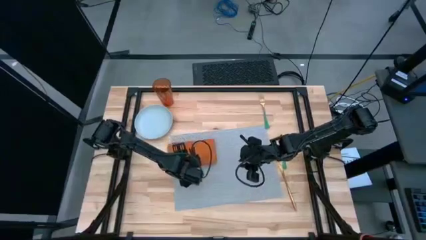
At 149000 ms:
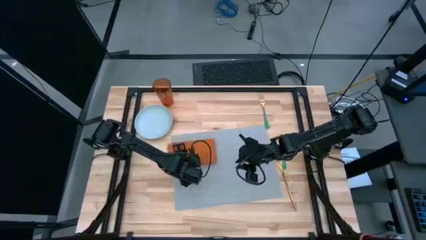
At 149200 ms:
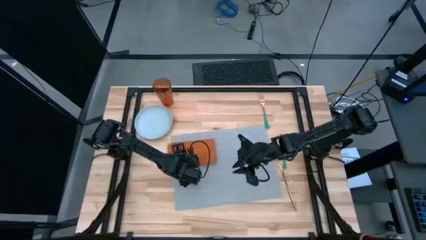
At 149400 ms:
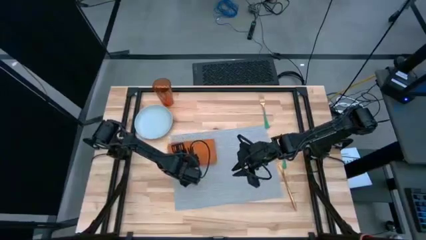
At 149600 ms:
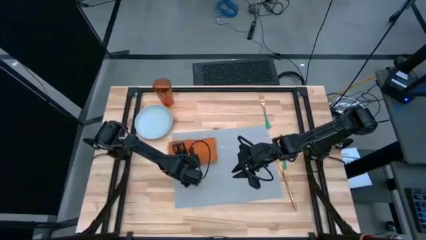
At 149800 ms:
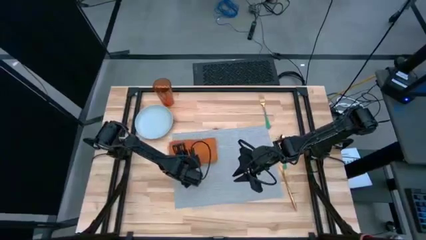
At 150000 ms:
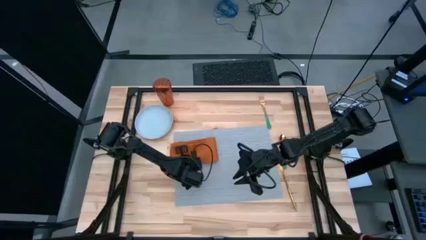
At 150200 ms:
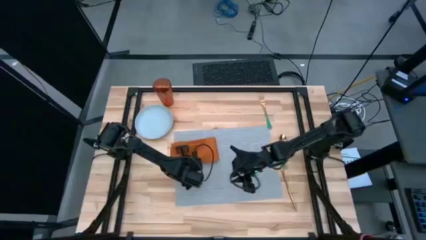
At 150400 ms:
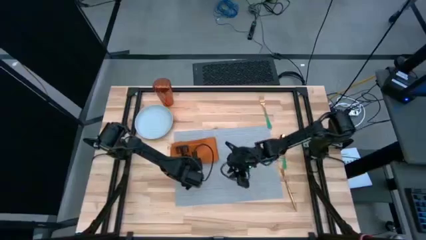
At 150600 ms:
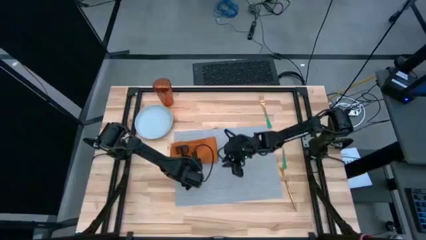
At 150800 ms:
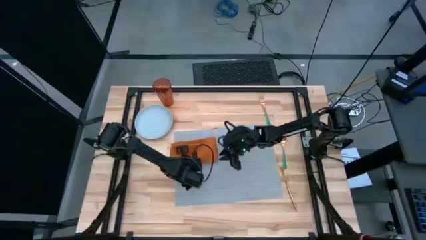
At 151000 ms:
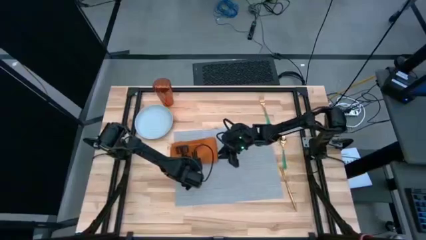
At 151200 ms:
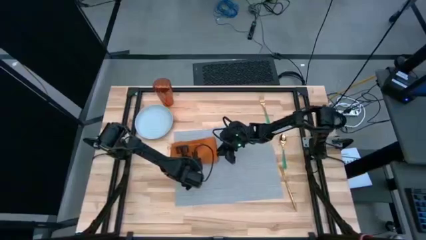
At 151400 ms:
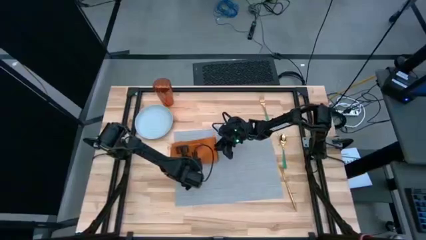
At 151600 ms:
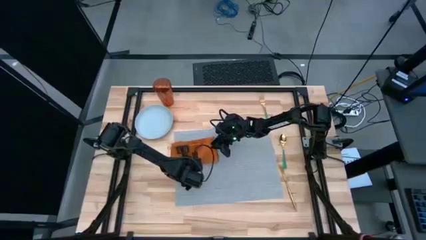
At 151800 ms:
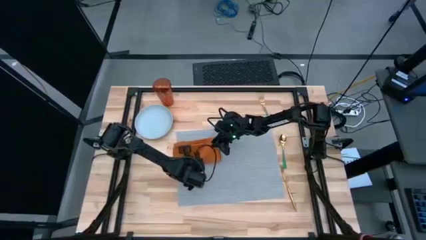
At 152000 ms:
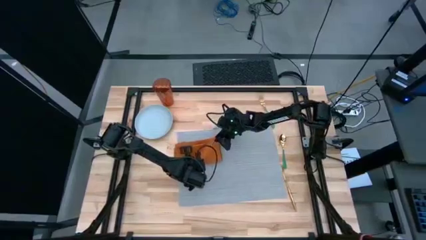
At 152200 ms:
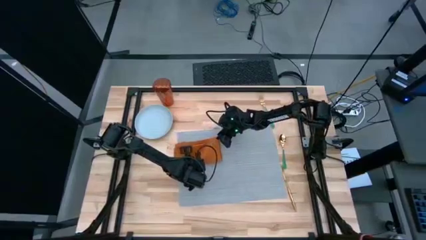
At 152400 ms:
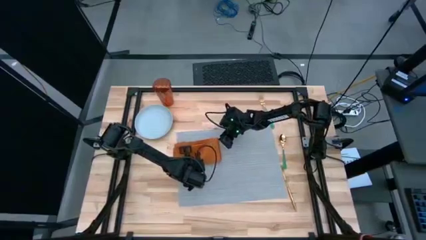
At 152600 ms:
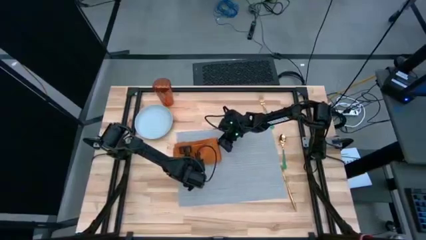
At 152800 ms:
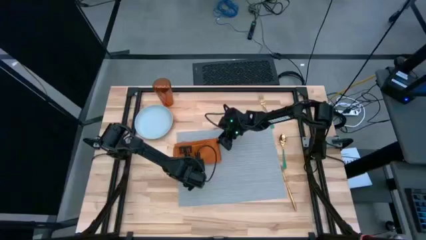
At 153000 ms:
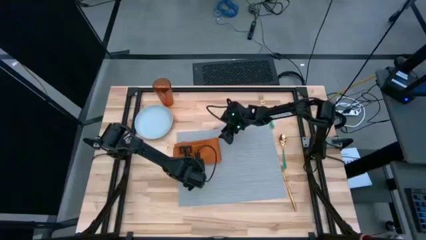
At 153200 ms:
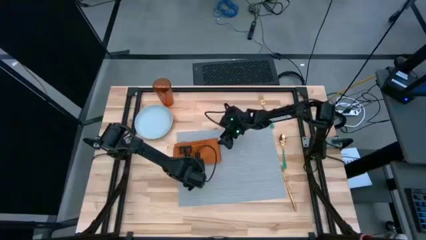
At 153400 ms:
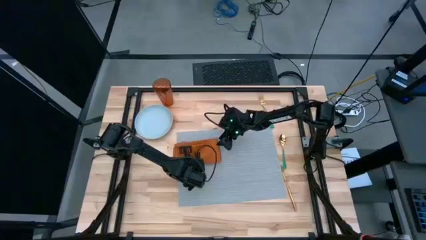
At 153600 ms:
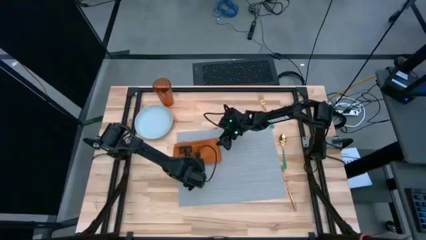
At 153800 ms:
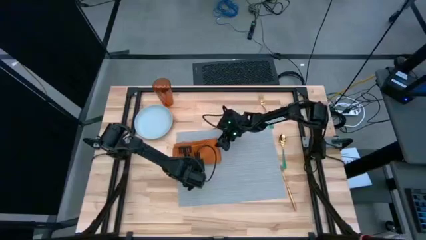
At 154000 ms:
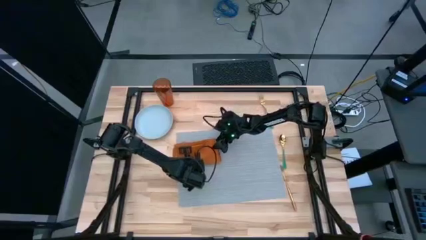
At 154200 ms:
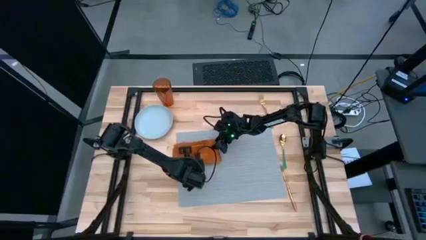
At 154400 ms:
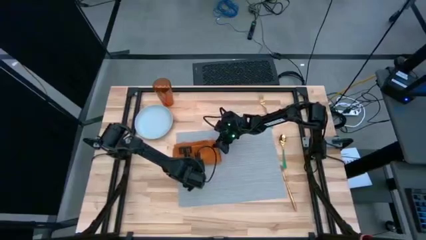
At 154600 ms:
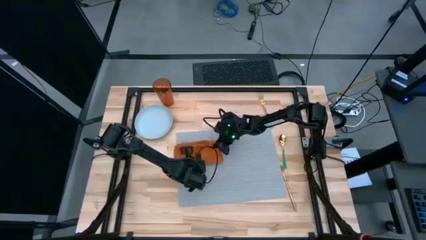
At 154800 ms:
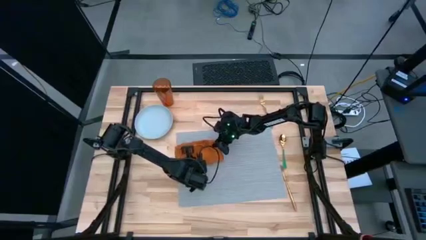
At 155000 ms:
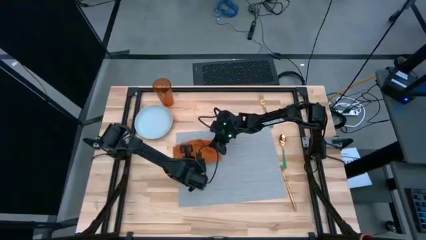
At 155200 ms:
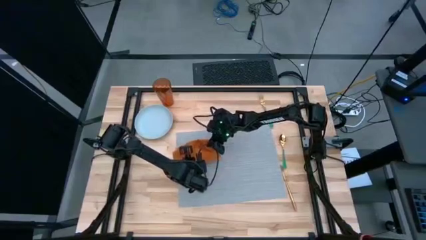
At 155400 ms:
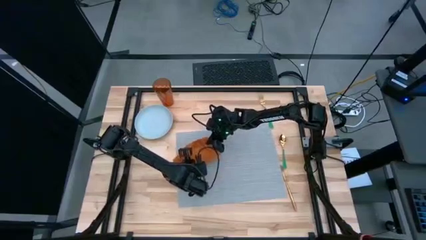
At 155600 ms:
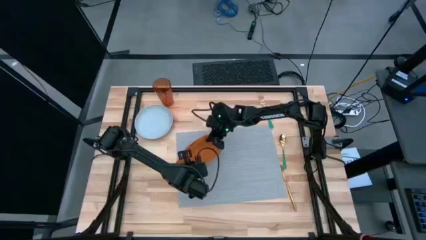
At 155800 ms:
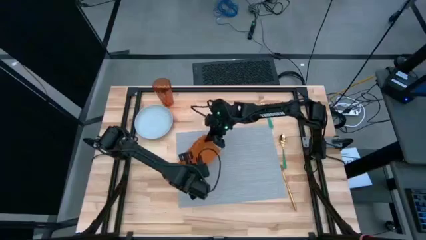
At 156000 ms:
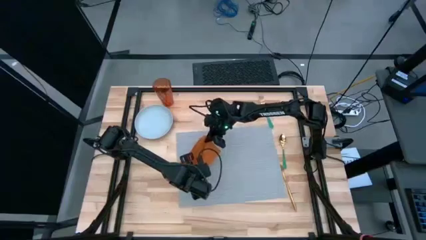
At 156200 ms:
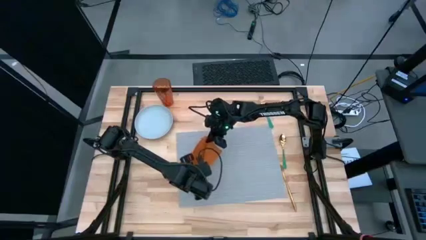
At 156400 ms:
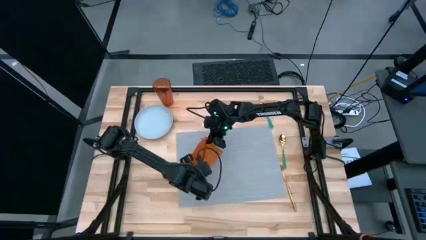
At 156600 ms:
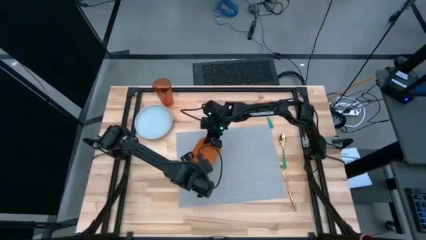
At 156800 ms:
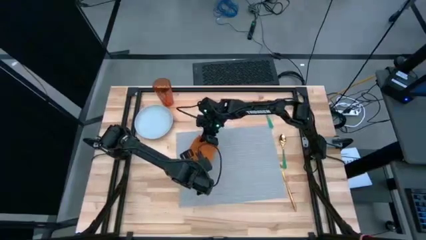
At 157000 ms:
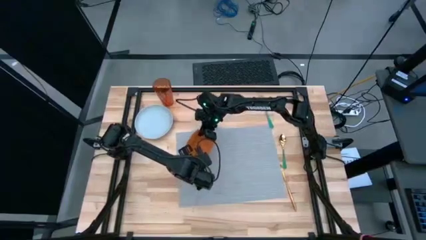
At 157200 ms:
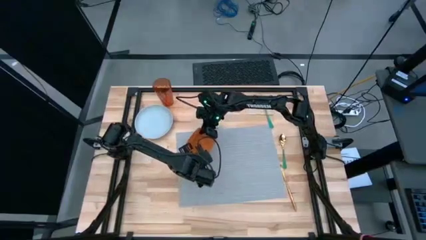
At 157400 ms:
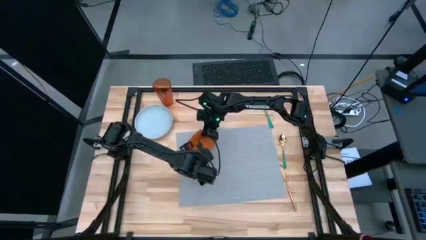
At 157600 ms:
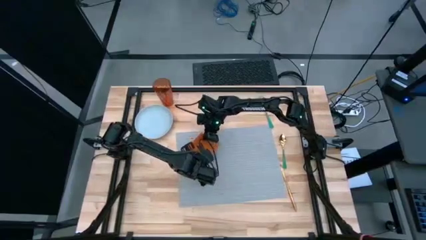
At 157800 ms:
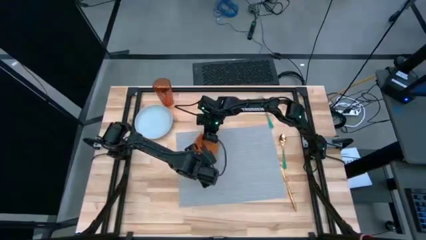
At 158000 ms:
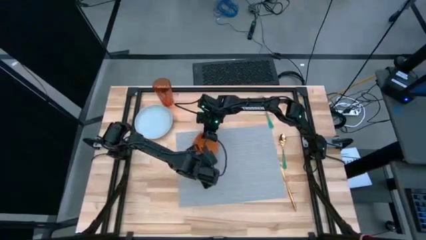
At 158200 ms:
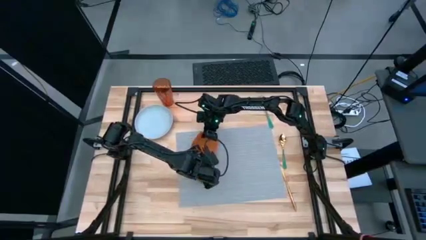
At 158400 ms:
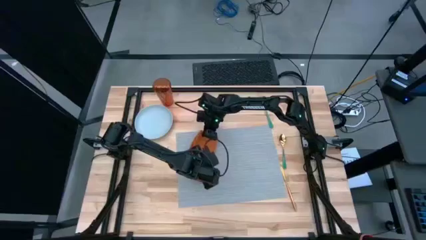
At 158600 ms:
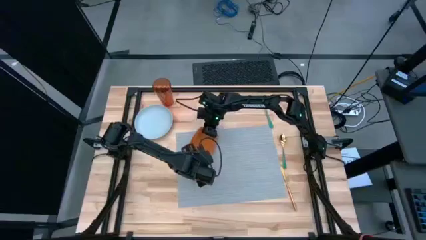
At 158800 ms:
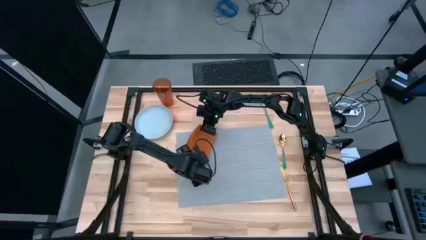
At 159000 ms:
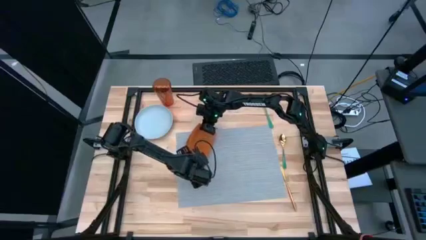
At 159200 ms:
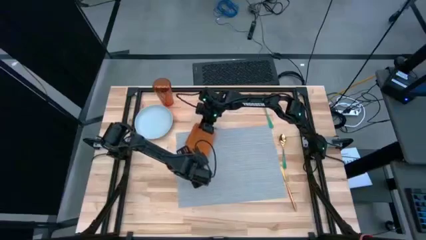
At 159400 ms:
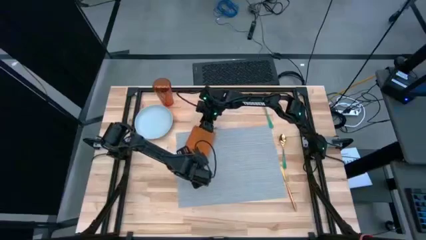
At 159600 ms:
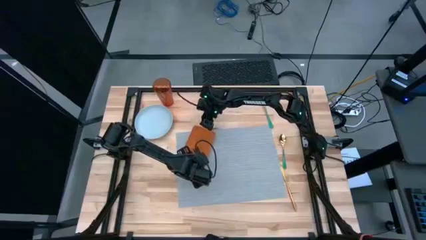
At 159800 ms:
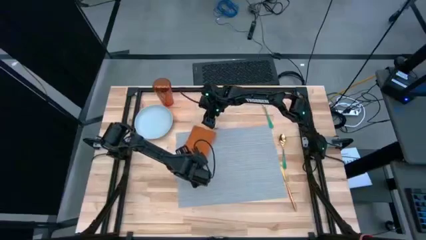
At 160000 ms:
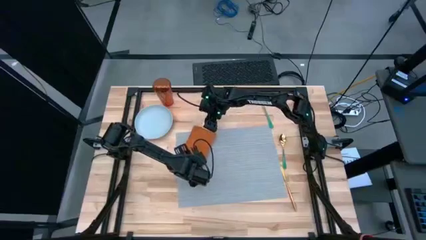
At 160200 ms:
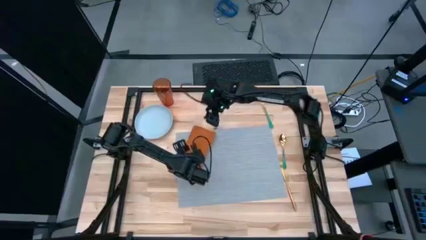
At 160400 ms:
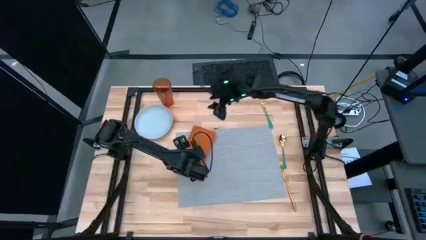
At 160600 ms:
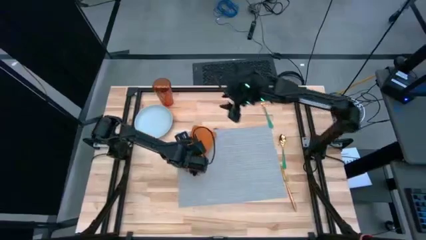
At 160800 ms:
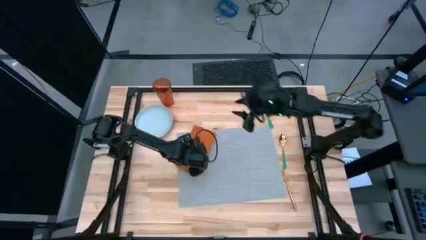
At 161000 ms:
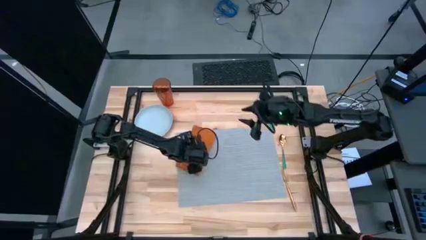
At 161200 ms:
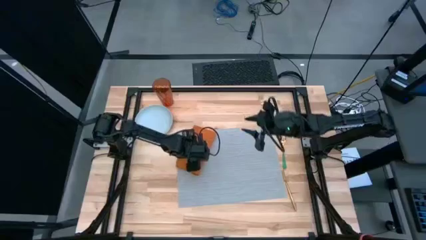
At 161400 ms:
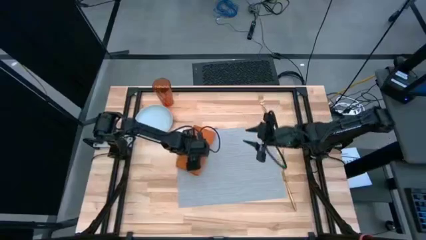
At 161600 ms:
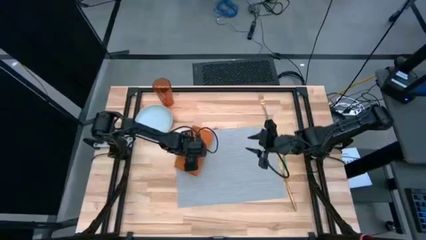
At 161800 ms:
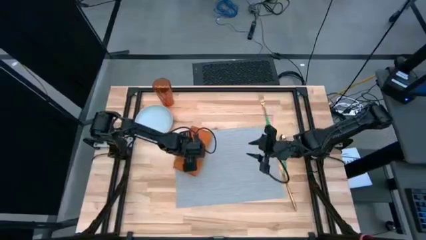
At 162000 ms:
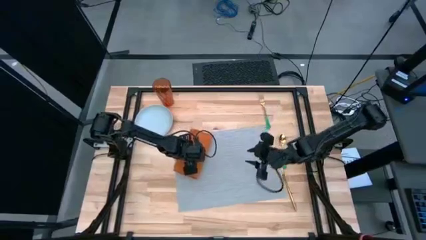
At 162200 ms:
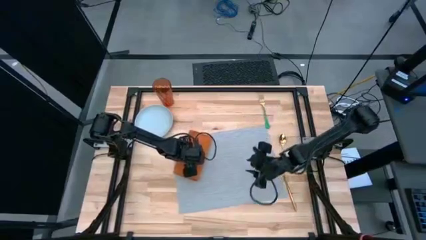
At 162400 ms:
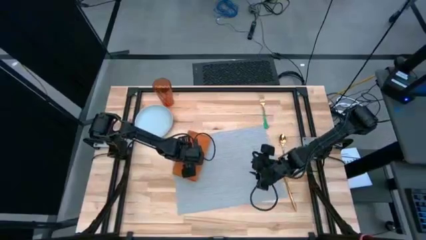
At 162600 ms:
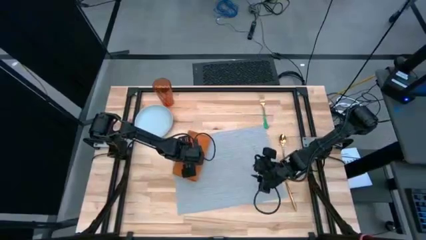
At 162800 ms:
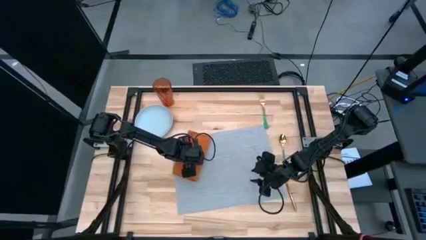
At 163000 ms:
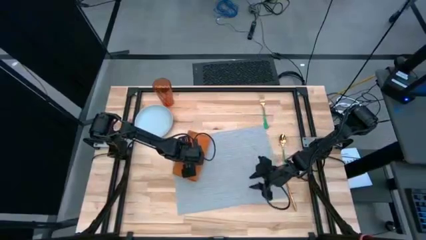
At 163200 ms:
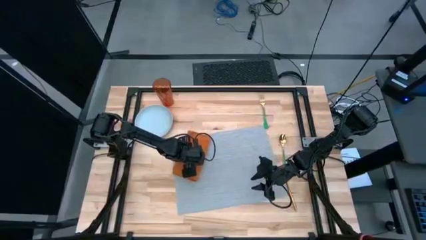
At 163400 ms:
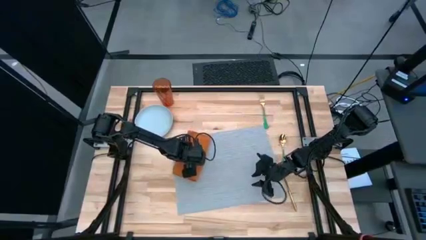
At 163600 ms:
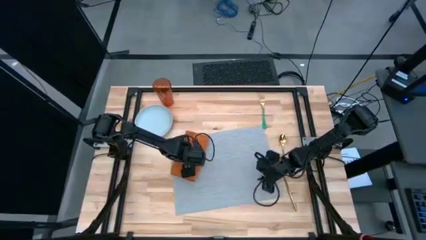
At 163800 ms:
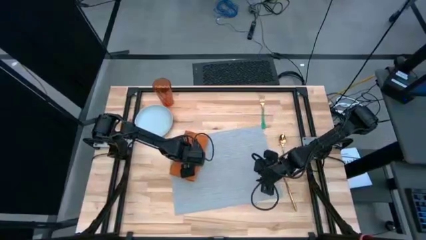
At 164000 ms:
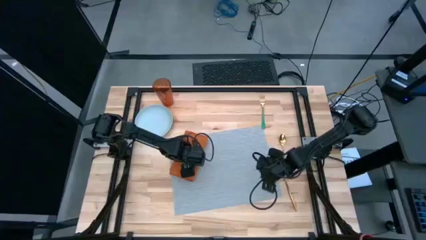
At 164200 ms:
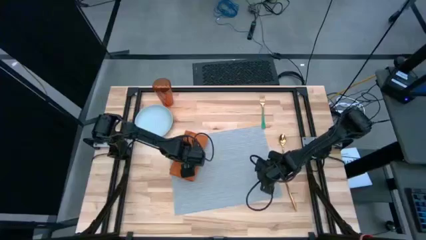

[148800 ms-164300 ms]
Task: Set table place
Adjust the orange napkin to the top left of the placemat

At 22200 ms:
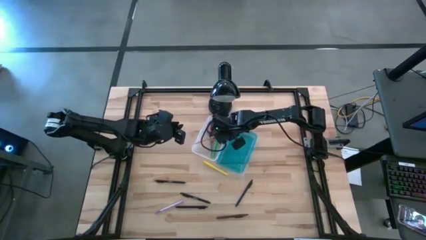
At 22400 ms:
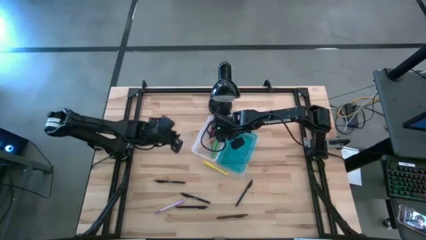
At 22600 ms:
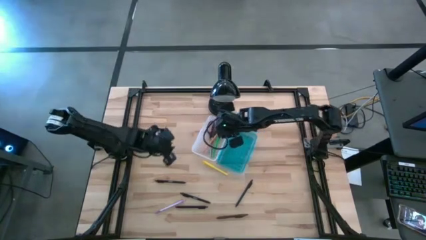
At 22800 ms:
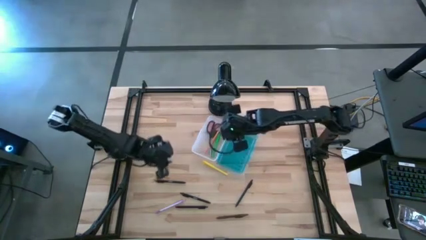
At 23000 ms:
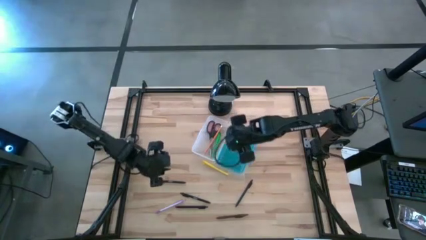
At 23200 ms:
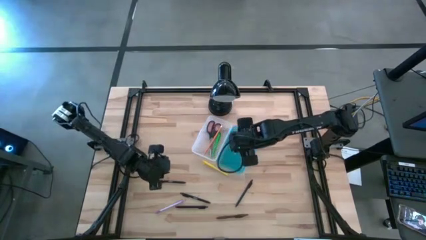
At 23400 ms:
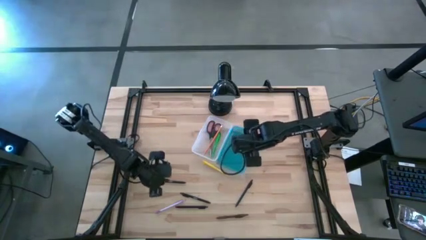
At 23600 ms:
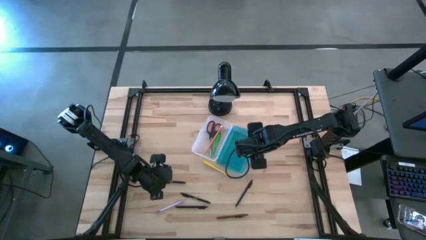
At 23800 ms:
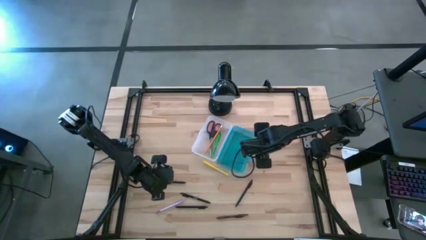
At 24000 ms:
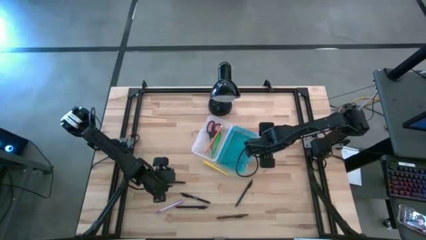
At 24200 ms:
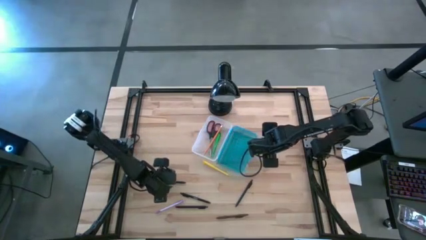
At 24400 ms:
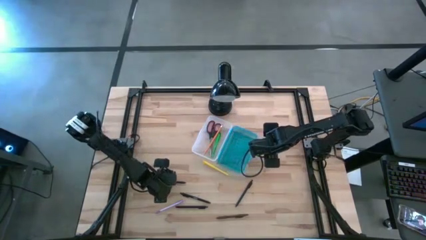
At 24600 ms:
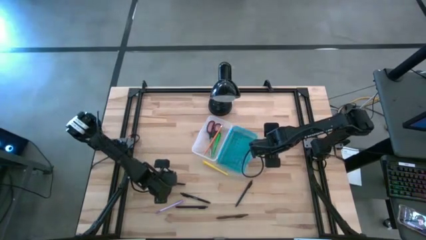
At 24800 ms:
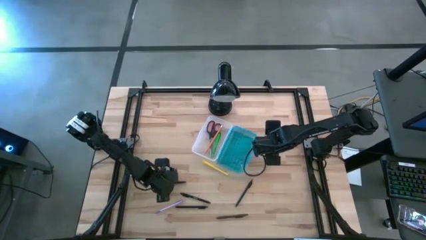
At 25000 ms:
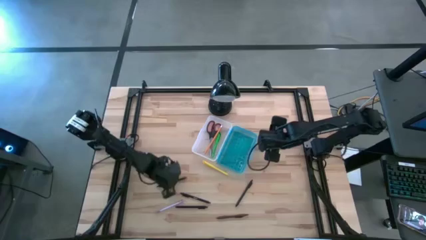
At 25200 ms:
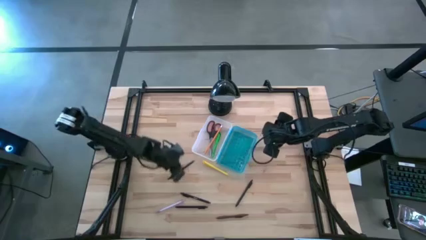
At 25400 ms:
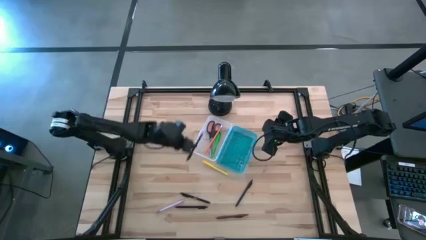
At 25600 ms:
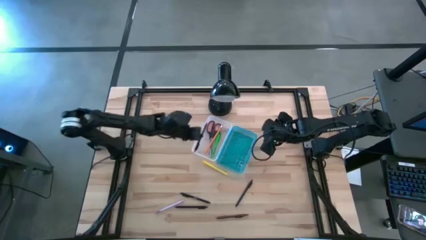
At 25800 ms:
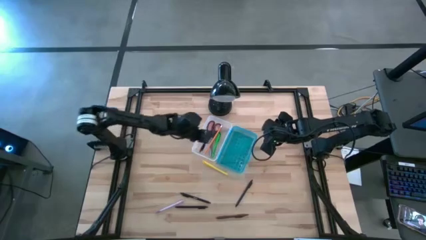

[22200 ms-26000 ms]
Task: Pick & place school supplies into a supply box
Put the black pen into the supply box
